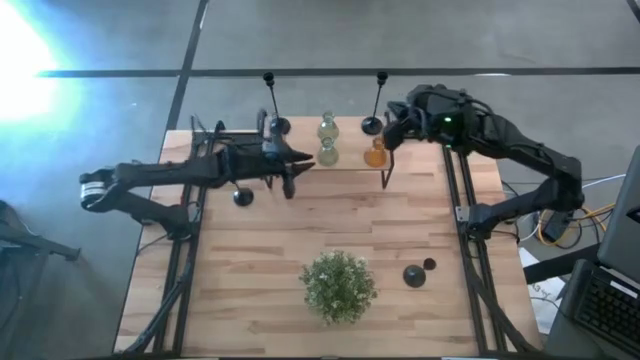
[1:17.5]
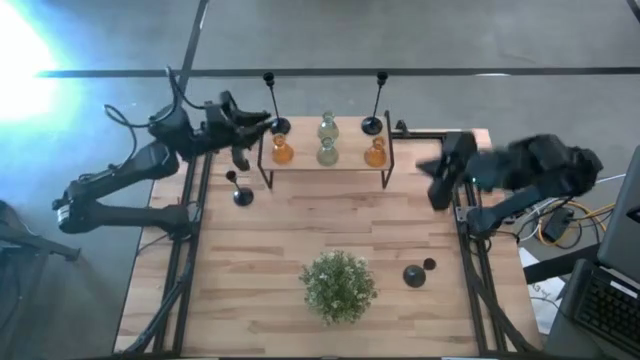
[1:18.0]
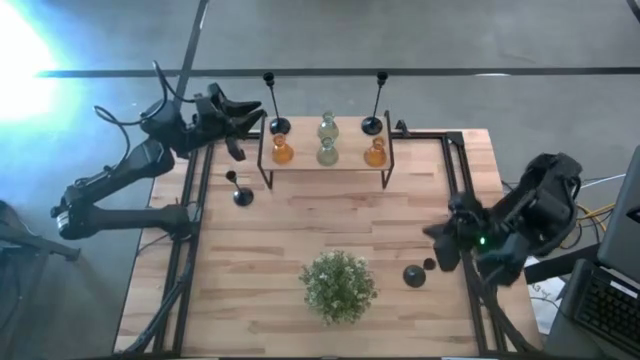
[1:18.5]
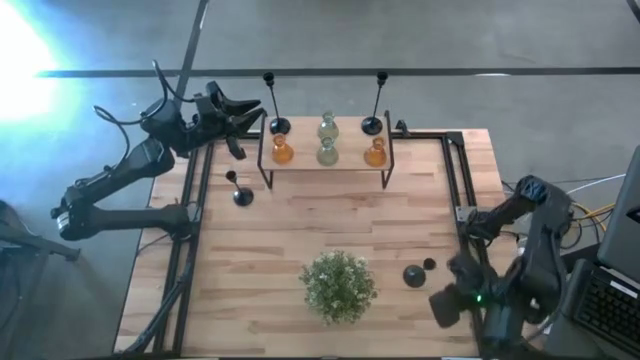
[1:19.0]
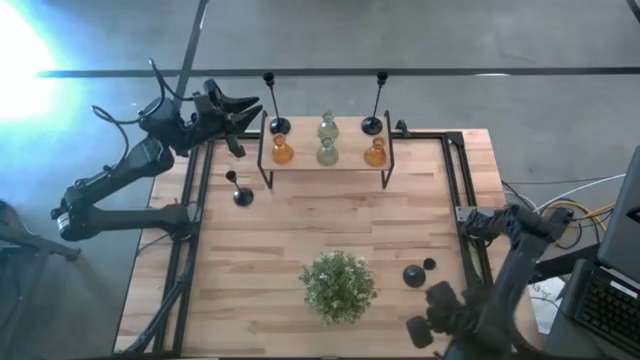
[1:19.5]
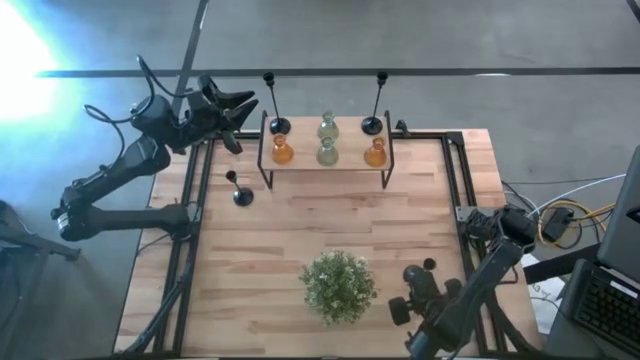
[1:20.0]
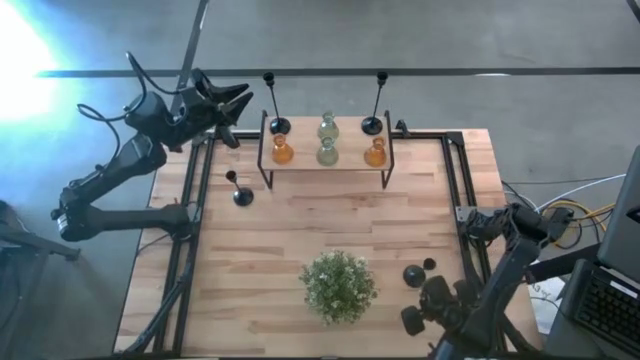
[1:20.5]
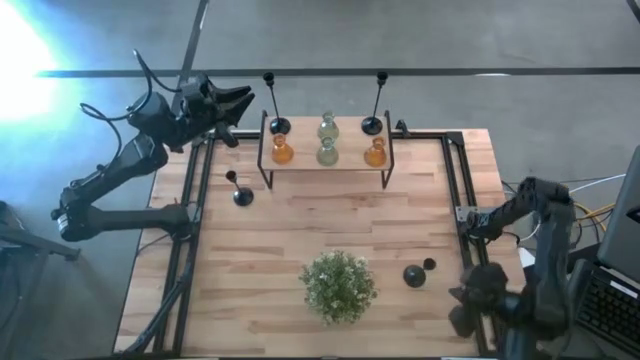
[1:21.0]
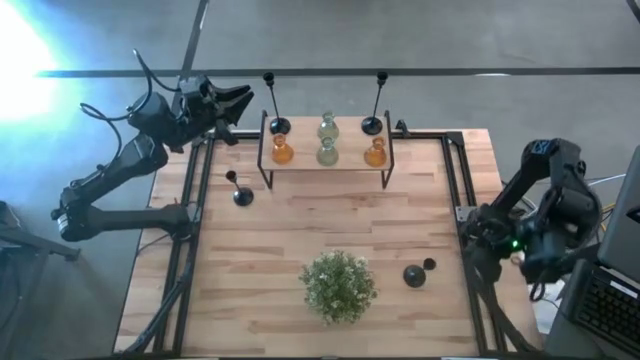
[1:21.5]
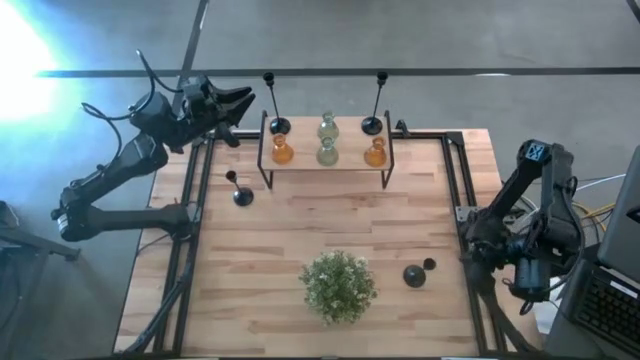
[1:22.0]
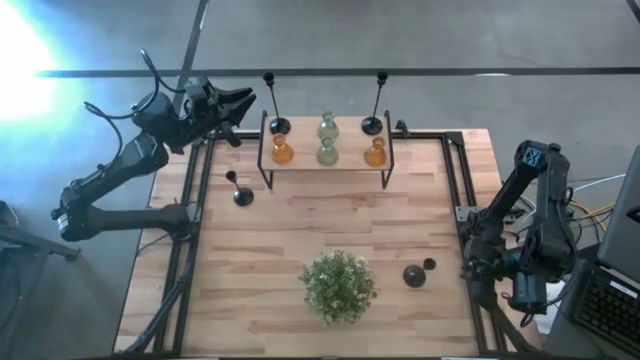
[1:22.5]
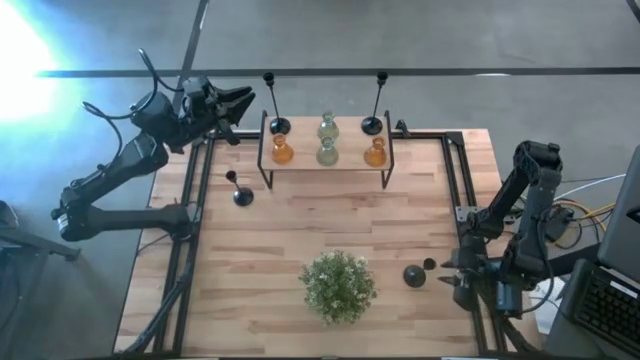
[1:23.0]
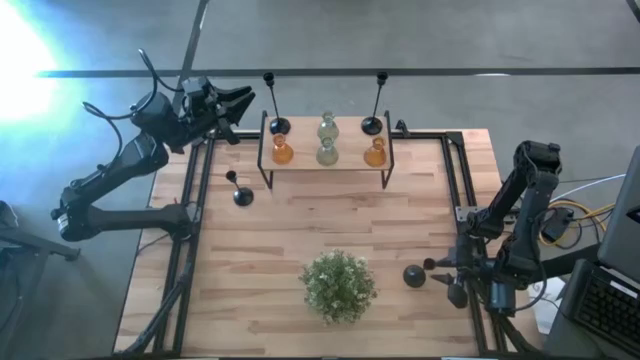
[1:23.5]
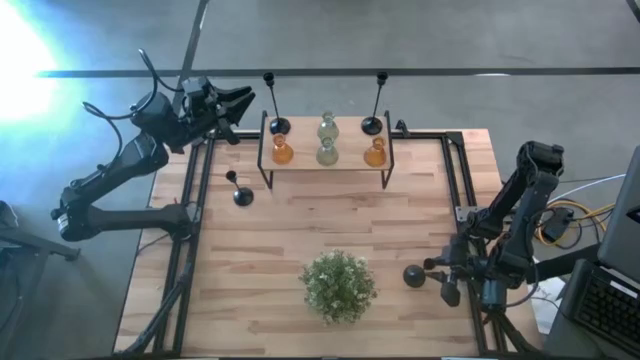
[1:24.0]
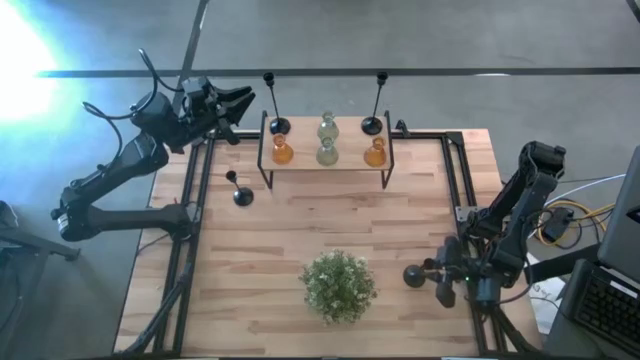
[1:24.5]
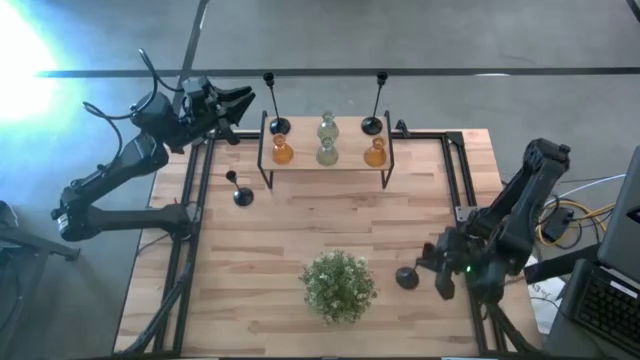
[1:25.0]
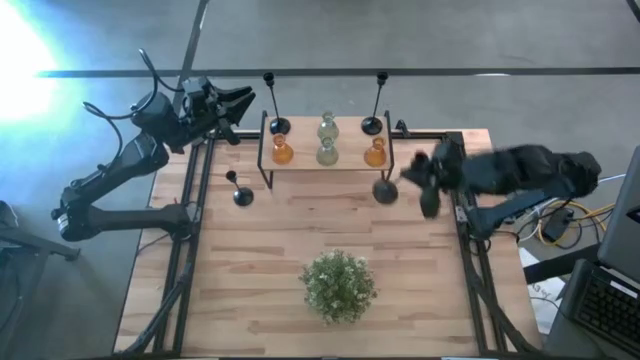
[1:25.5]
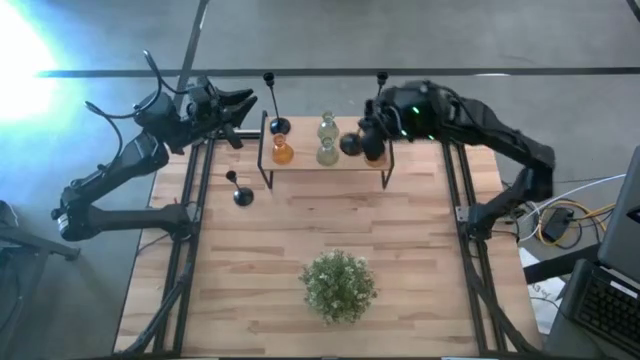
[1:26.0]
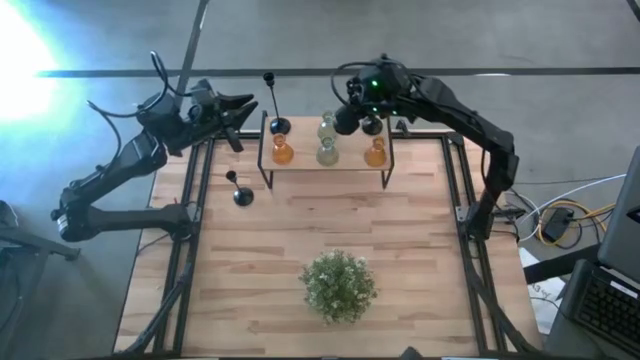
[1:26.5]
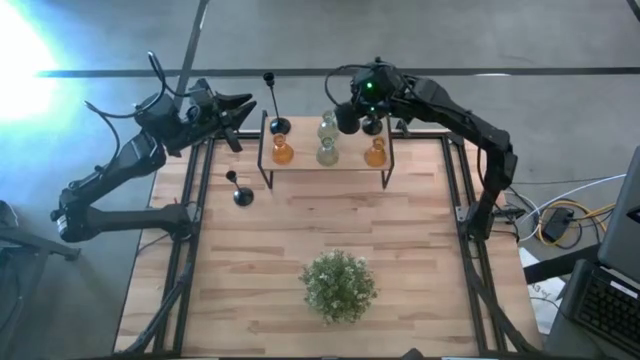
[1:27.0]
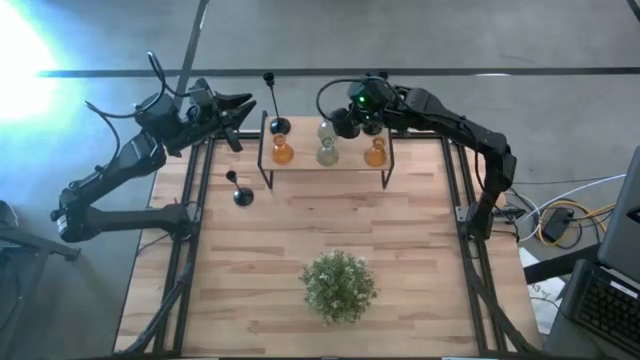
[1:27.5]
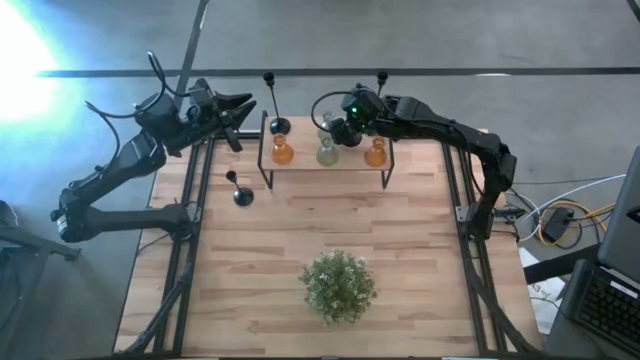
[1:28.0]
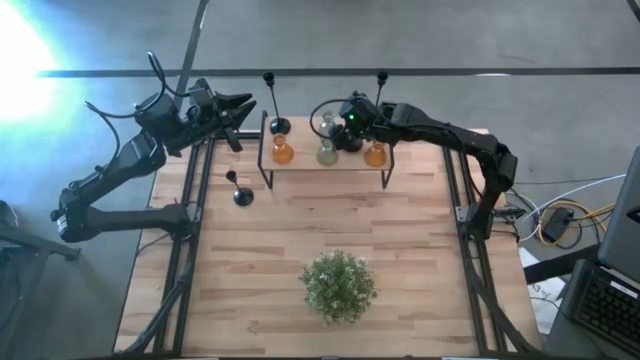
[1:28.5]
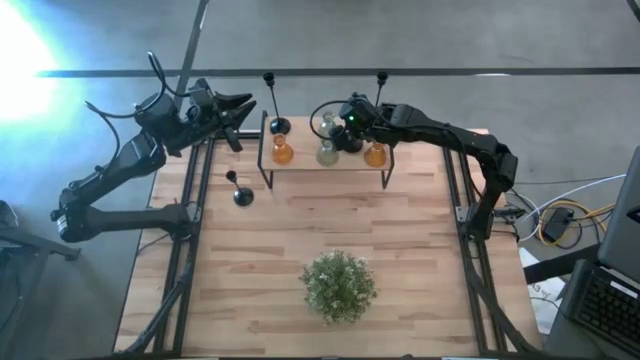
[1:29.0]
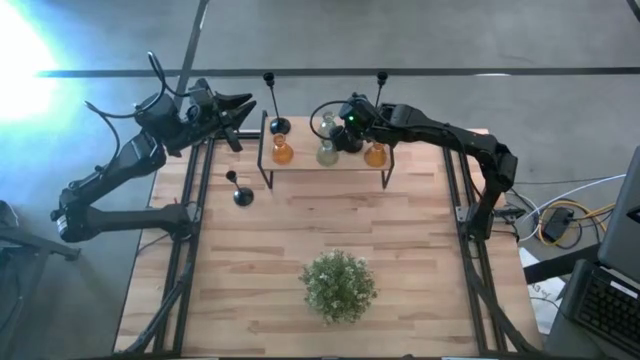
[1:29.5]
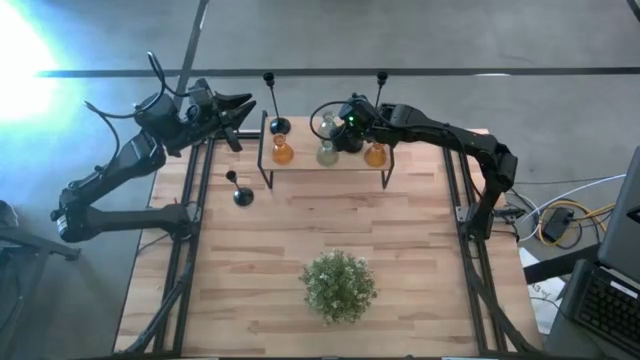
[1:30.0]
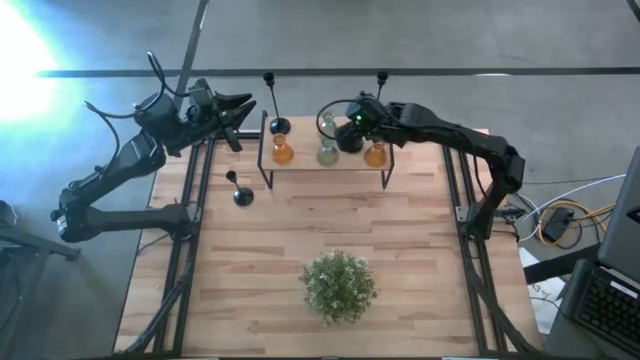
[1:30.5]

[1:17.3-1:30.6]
Task: Pick & Place candle stick holders
Put the right small black candle holder on the shelf

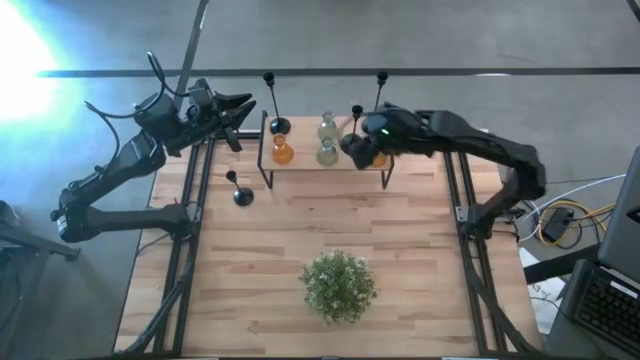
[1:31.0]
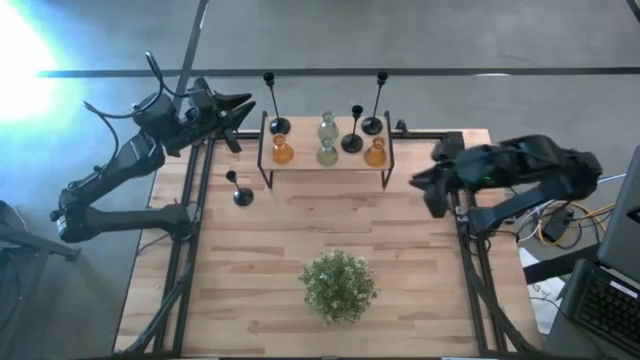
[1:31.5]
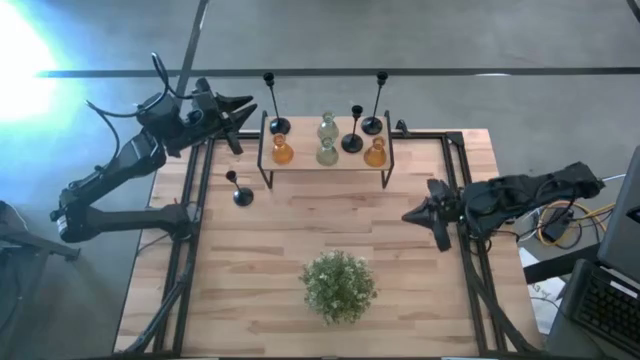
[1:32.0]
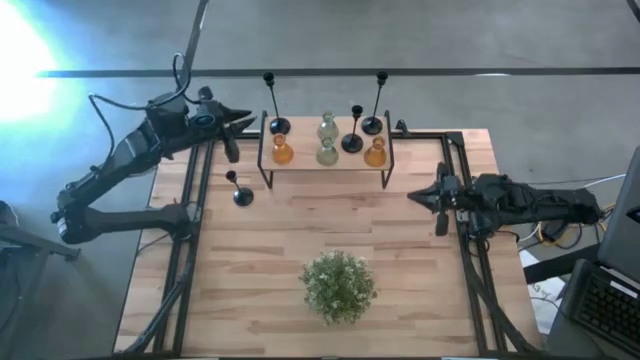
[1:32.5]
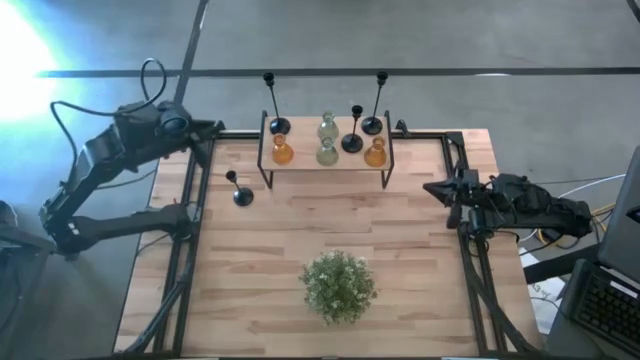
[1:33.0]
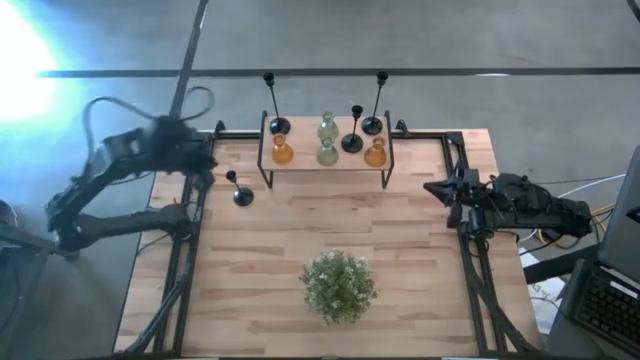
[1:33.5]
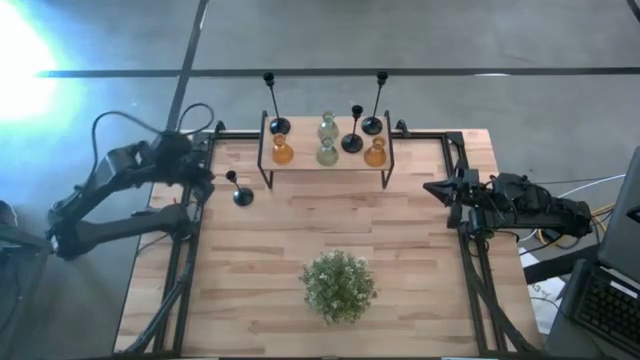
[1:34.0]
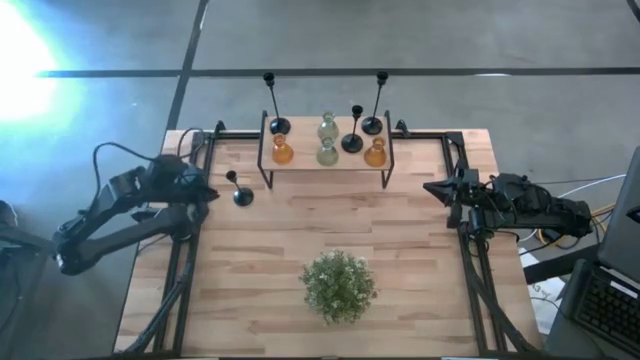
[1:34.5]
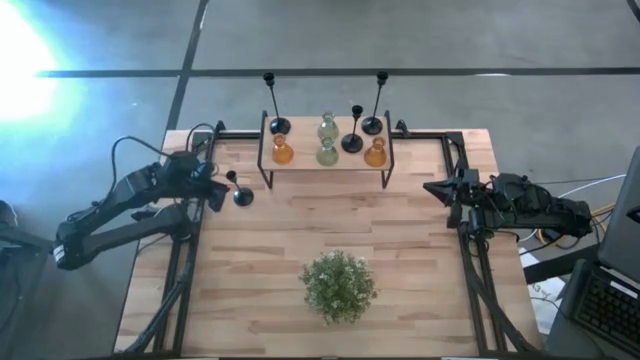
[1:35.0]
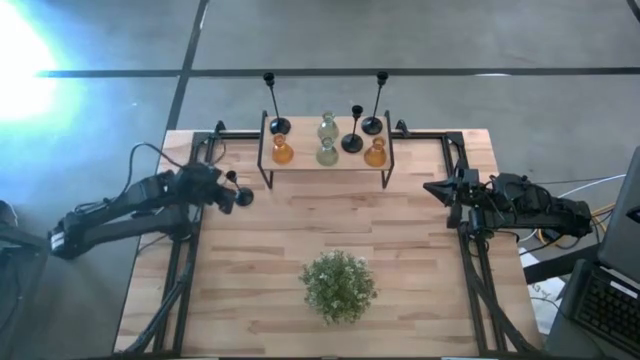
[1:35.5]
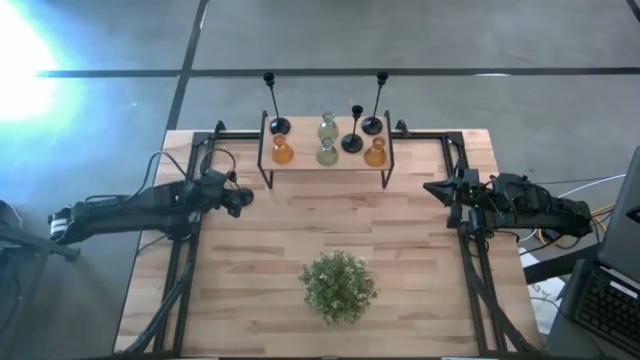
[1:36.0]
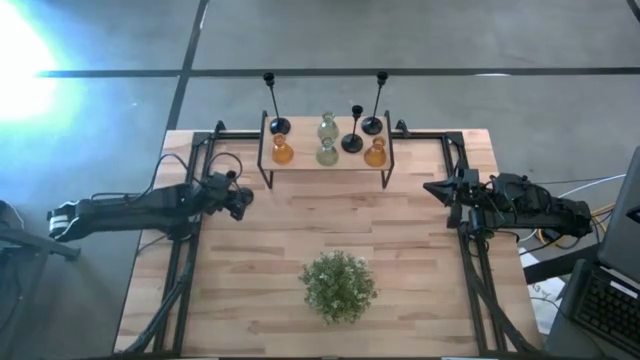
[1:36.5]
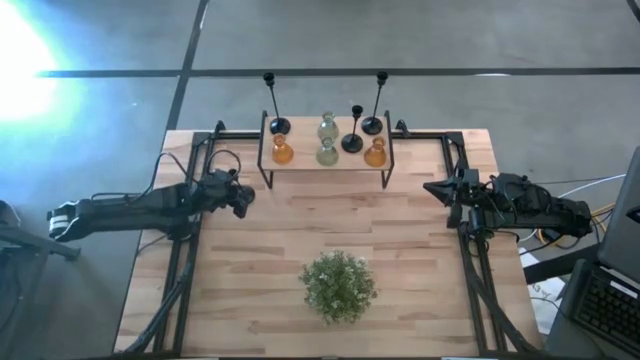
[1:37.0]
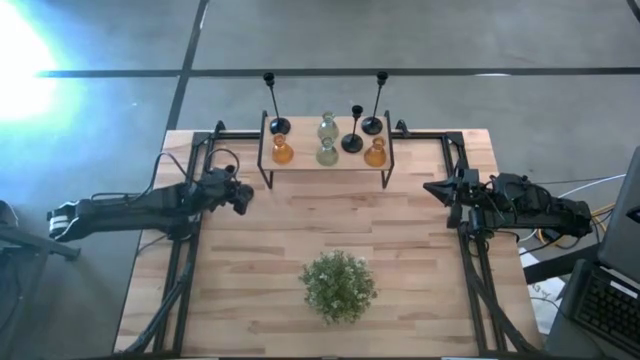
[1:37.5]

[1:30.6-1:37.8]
Put the small black candle holder on the shelf

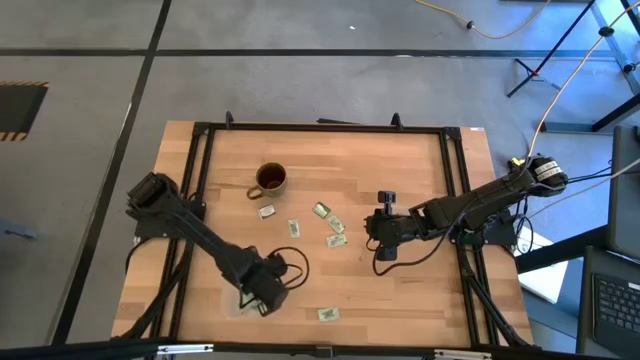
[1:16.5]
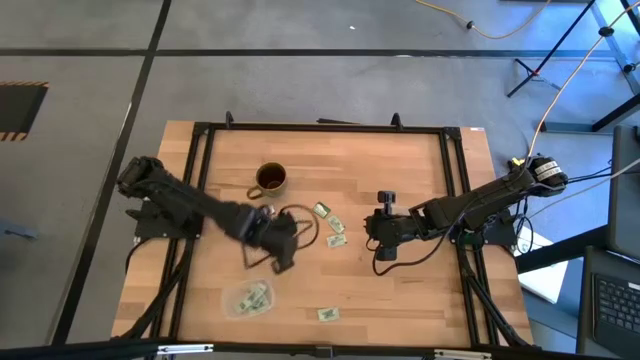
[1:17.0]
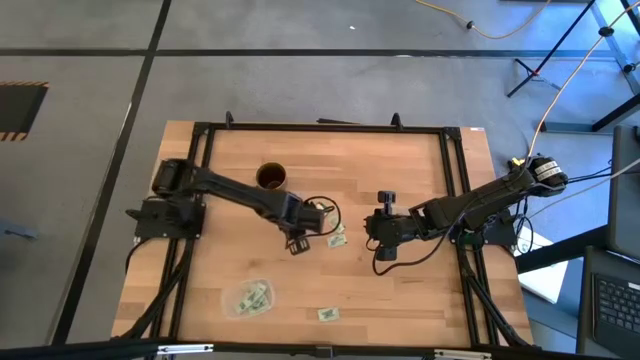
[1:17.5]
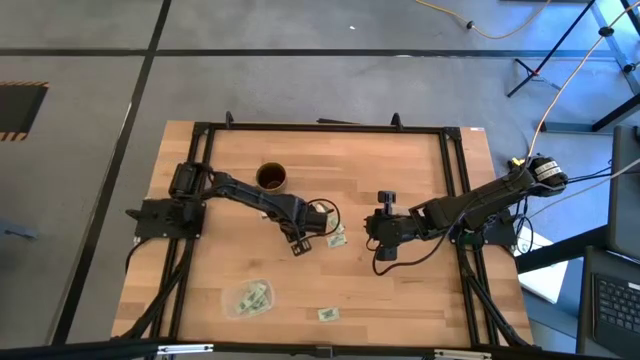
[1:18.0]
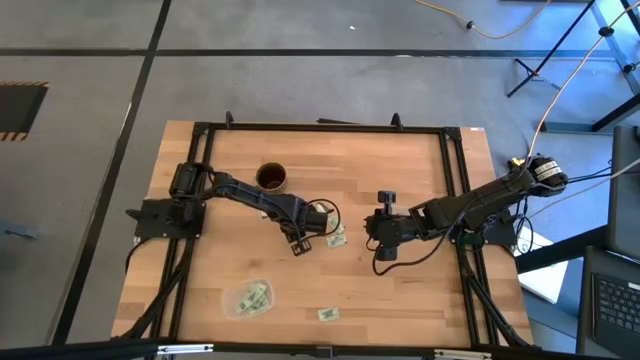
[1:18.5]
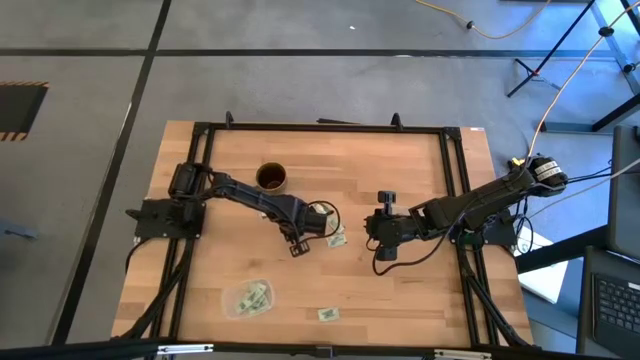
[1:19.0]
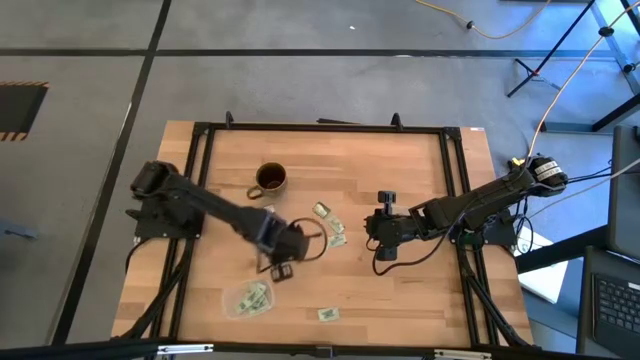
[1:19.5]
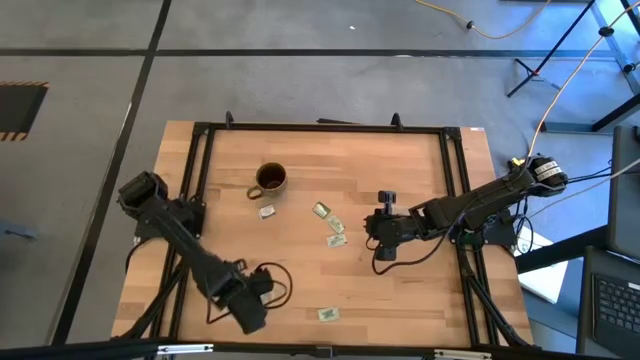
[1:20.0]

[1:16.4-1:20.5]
Task: Pick and place Stevia / Truvia into bins
Put the stevia packet into the bottom transparent container
